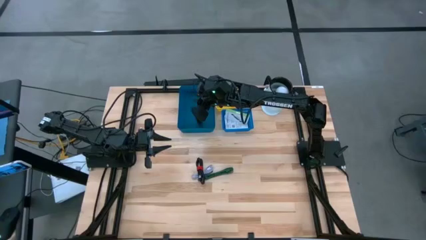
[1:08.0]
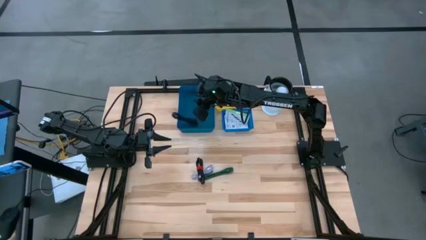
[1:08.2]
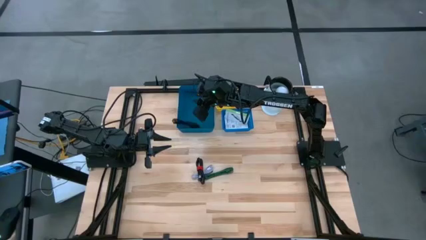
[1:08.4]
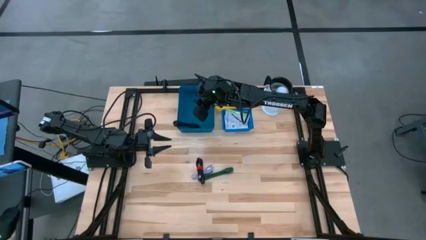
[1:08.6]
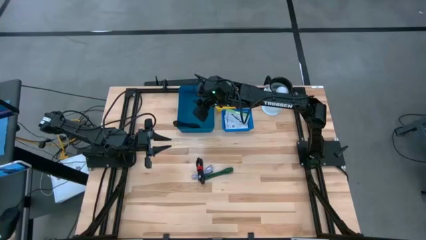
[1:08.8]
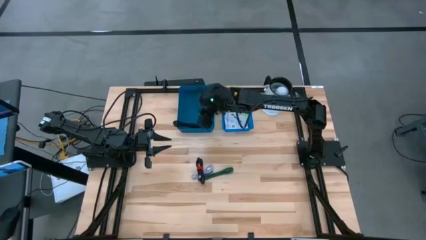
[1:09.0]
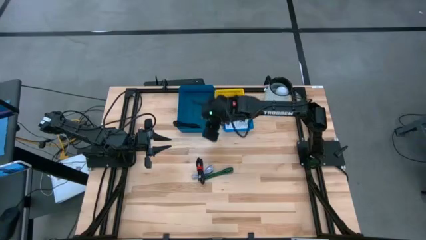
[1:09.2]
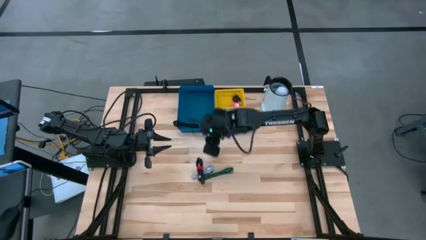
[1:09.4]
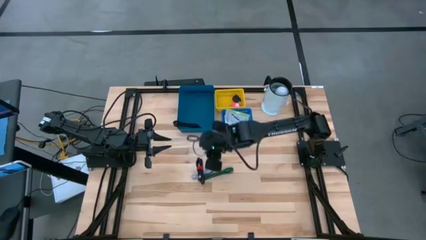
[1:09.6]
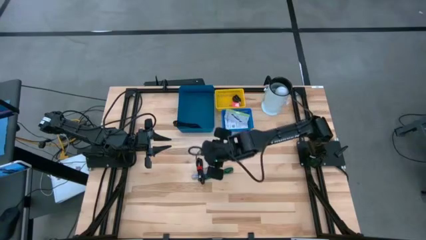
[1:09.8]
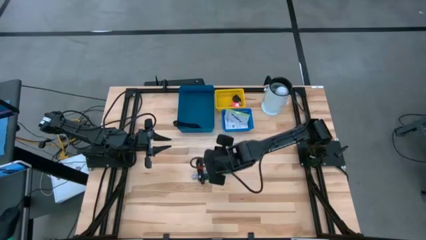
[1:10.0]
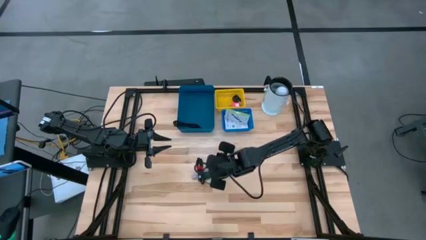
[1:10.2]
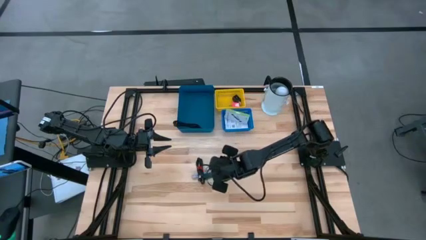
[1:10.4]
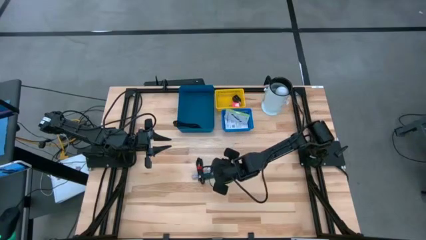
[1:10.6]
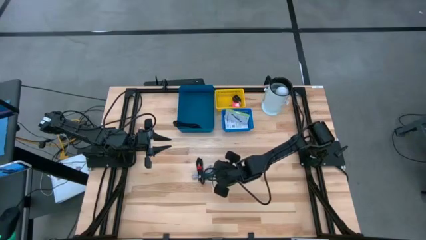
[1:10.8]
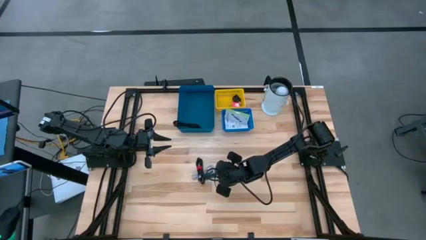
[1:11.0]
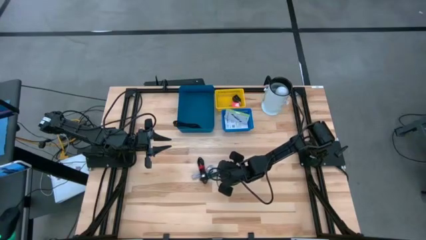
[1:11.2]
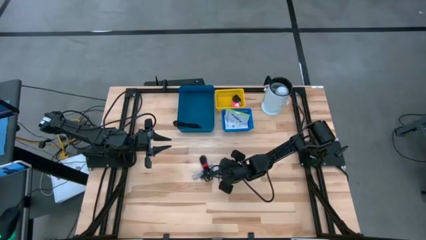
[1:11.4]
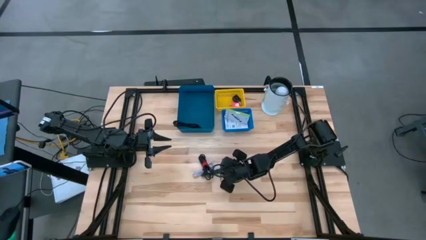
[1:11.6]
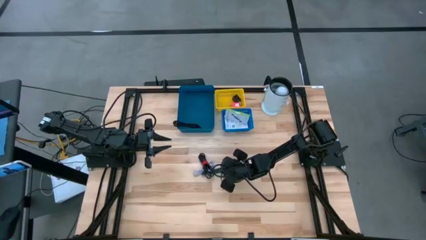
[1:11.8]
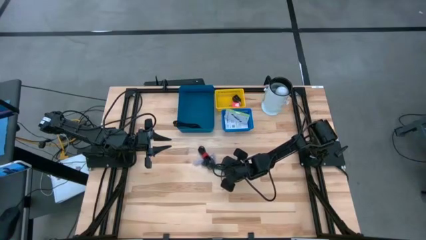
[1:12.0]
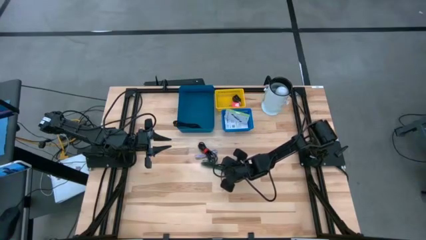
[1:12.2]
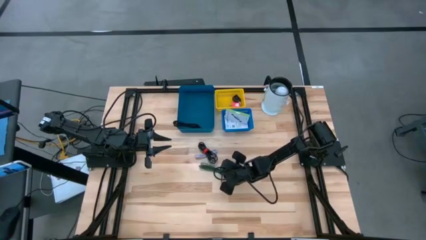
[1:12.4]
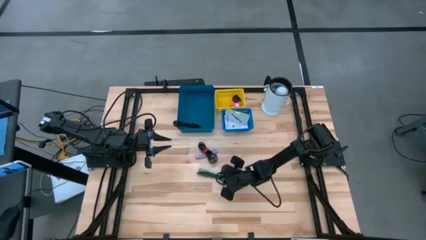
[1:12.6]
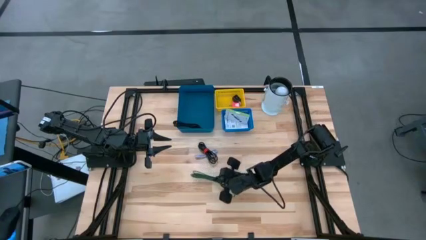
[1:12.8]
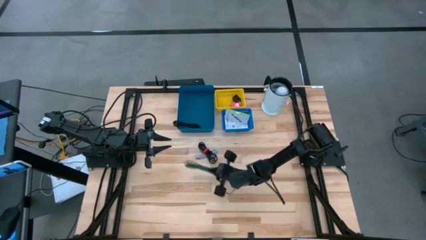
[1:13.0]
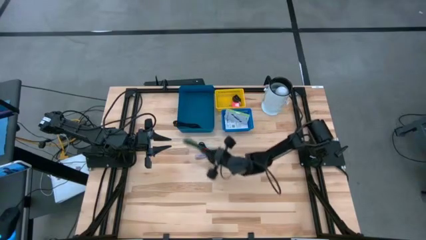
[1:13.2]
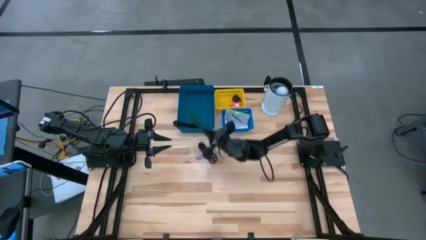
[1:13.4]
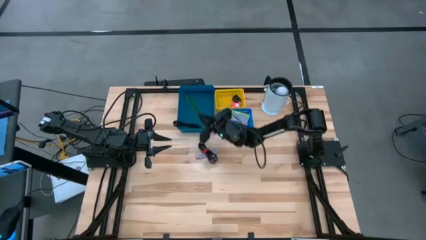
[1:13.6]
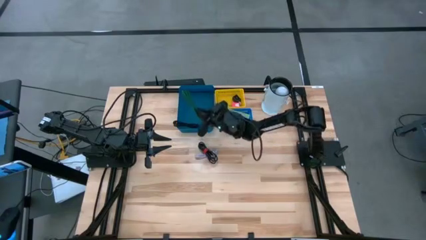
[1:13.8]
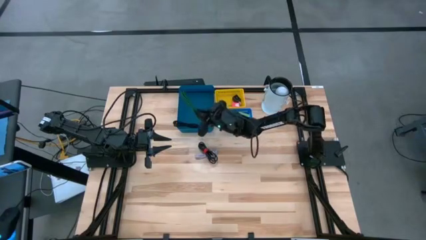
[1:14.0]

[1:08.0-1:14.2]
Task: Pick and place items into bin
Put the green charger cable into the dark blue bin

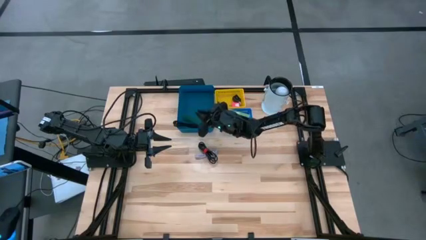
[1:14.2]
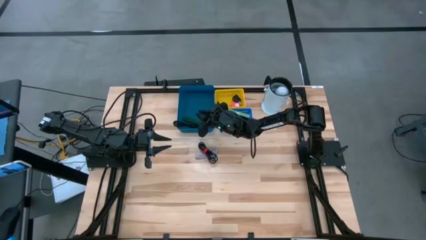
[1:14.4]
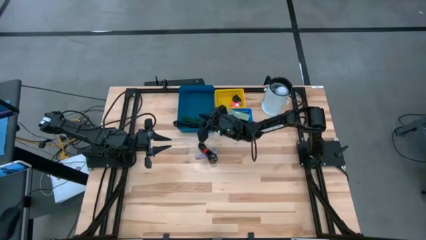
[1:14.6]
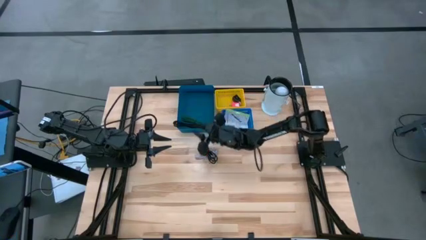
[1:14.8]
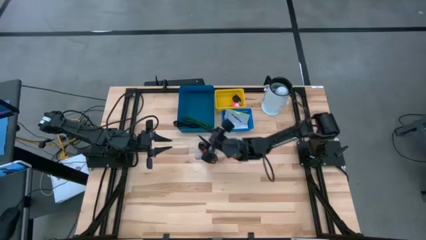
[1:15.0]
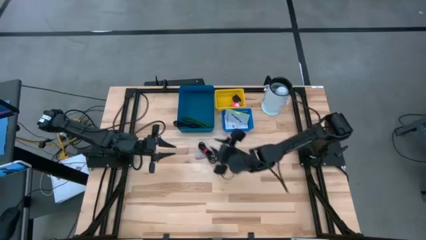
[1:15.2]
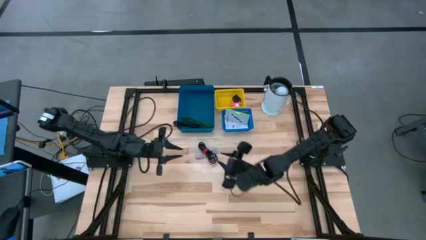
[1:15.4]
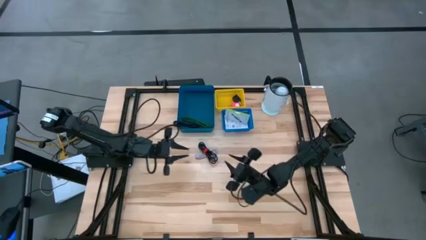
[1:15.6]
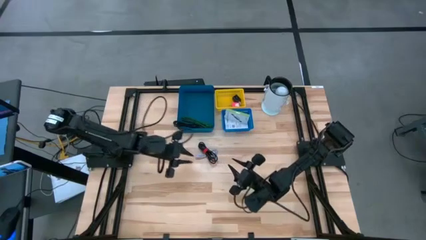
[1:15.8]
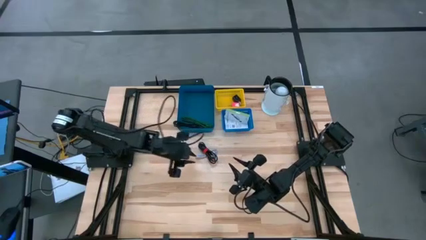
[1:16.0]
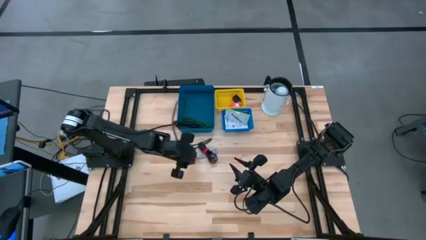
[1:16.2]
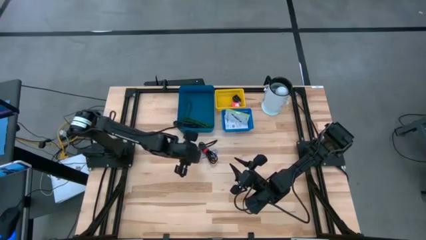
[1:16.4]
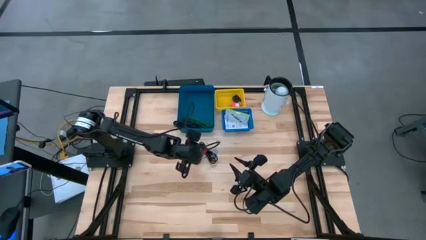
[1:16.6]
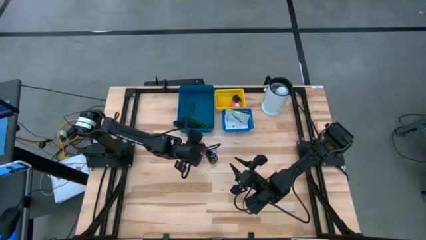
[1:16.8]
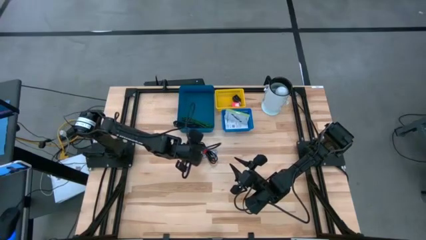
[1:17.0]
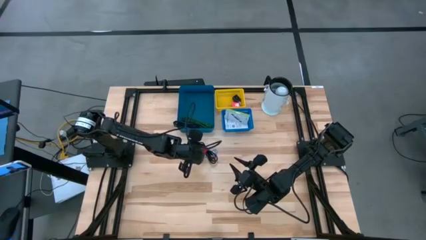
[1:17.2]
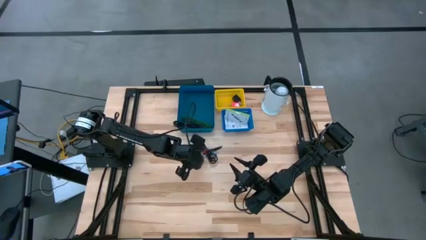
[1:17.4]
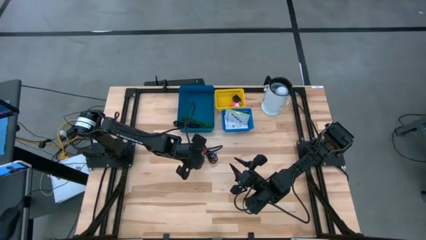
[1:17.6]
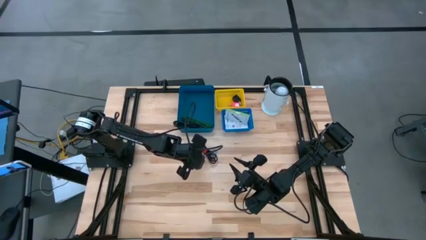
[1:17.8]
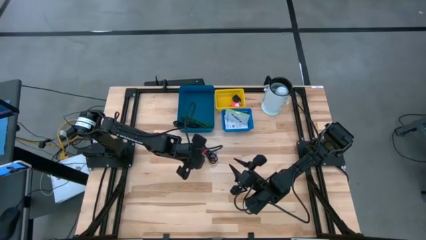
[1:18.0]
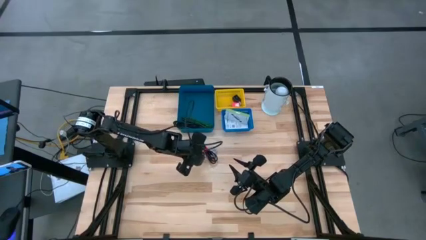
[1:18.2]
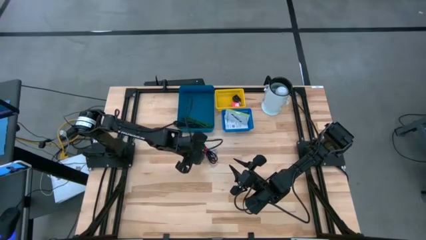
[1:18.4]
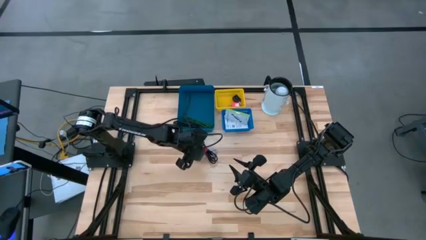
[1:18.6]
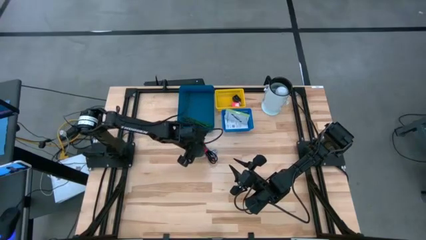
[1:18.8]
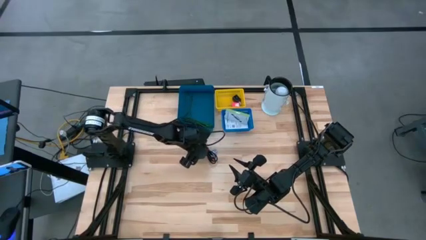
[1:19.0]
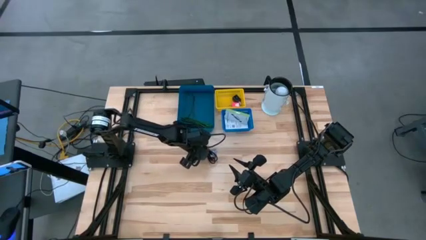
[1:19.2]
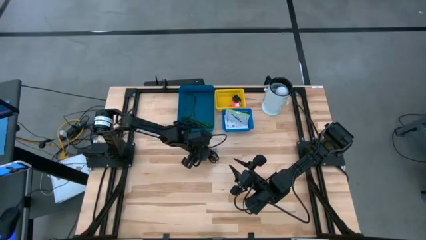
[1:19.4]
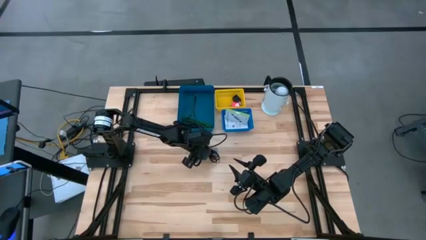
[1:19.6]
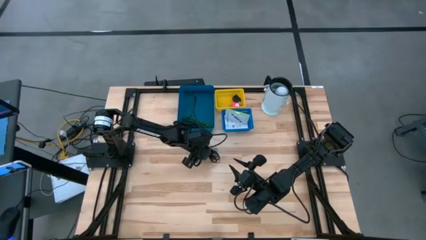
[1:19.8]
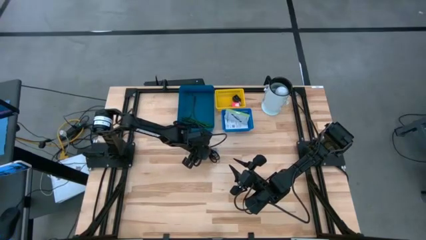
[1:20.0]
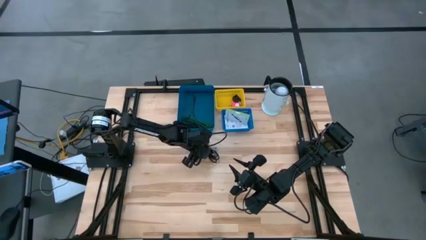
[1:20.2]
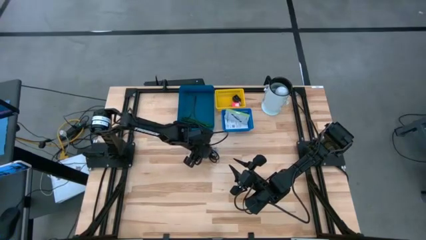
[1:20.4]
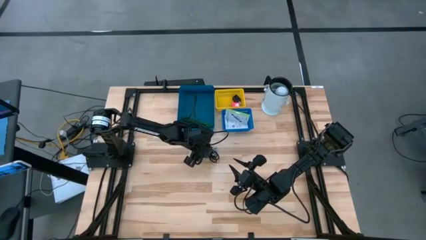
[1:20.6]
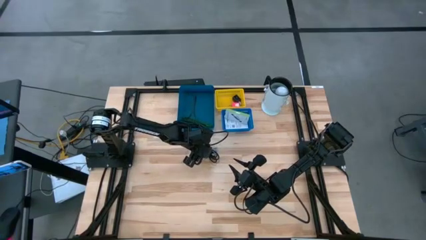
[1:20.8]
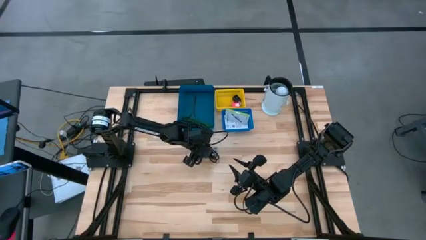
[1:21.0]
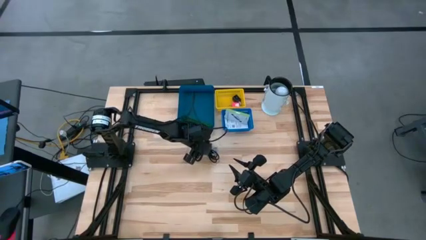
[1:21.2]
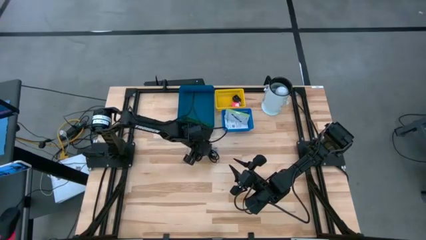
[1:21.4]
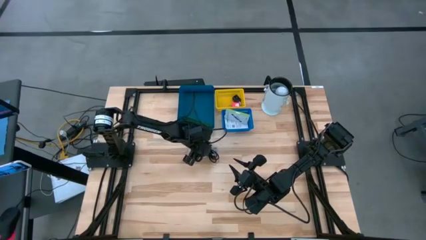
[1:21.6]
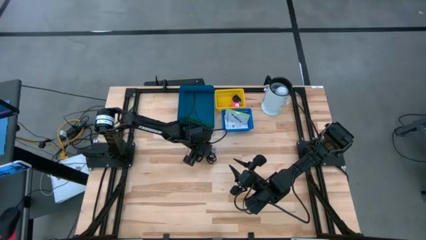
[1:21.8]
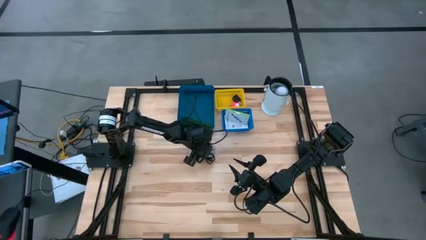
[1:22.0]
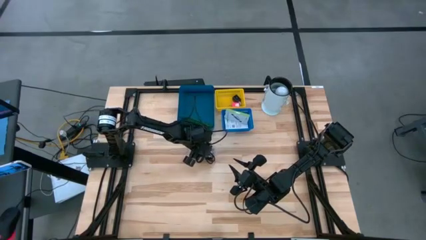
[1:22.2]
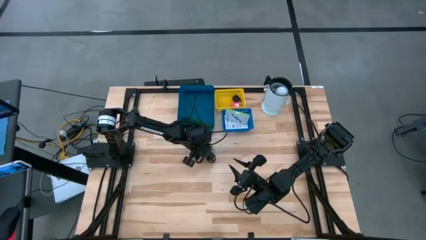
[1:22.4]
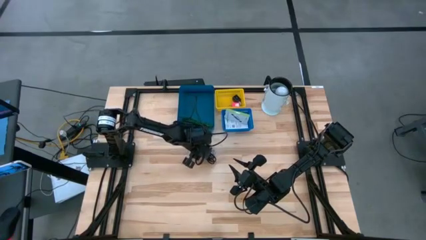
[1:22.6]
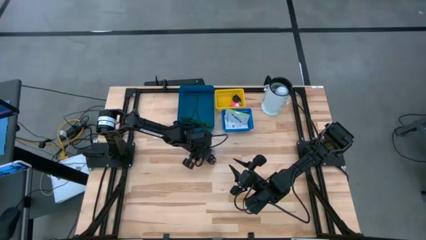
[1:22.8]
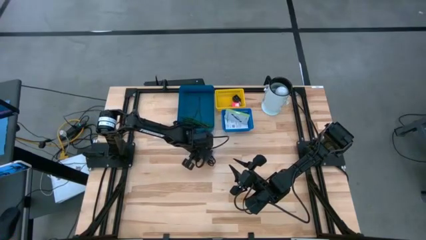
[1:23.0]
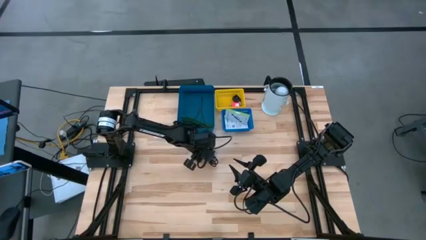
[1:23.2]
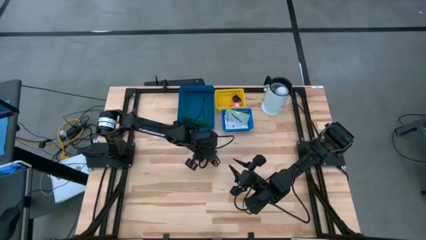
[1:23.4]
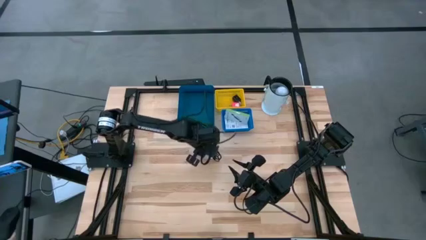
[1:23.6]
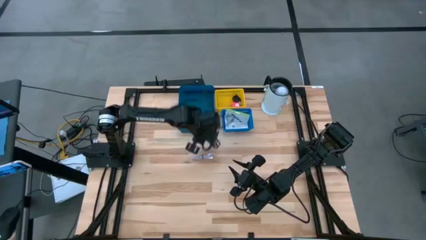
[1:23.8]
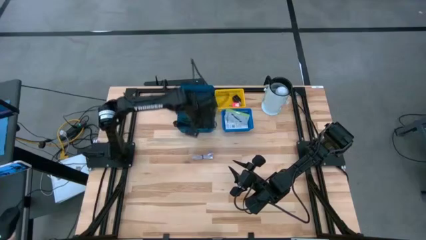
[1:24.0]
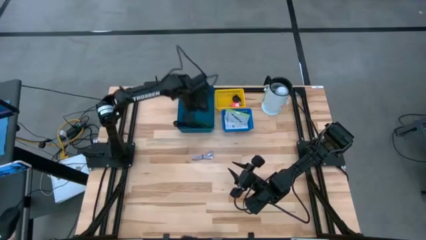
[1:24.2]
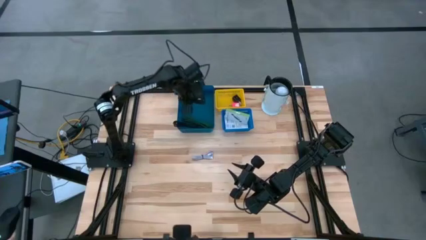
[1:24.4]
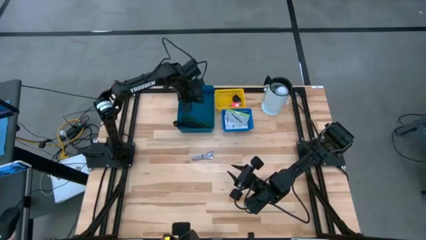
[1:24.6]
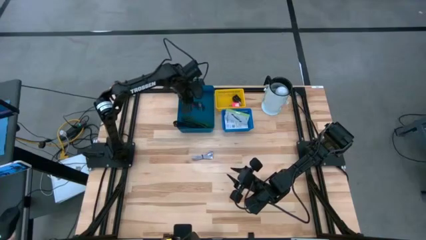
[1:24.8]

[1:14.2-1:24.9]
Put the black charger cable into the dark blue bin
